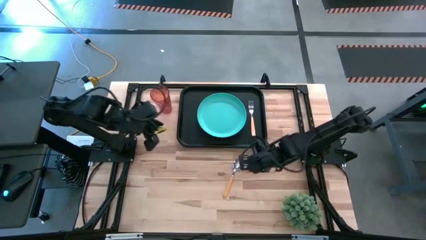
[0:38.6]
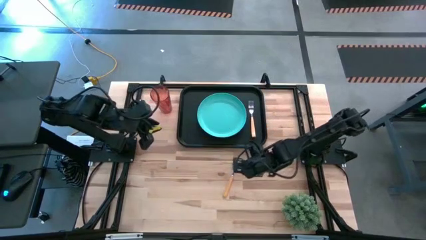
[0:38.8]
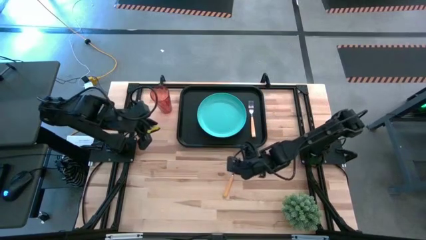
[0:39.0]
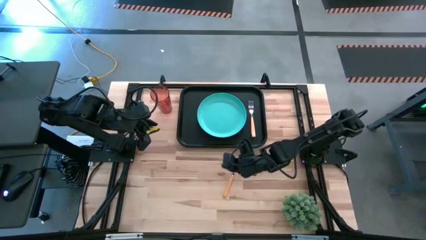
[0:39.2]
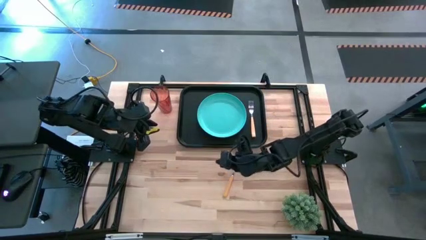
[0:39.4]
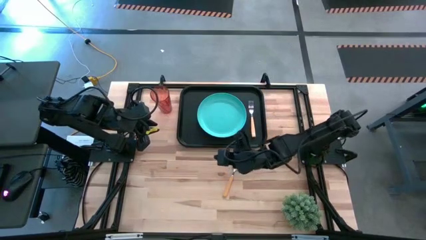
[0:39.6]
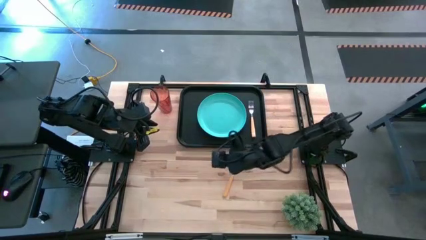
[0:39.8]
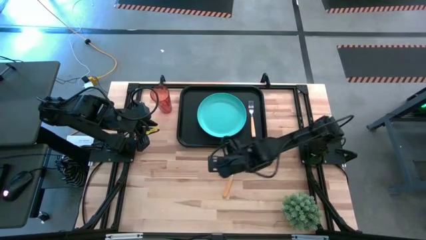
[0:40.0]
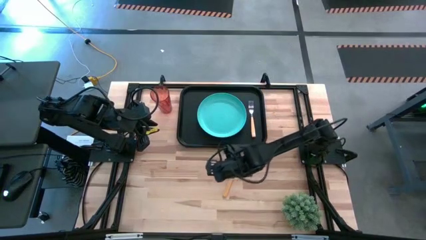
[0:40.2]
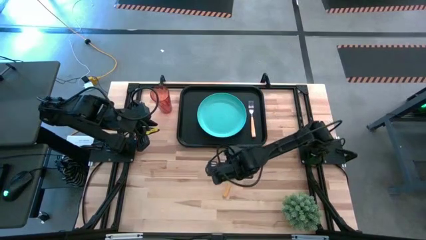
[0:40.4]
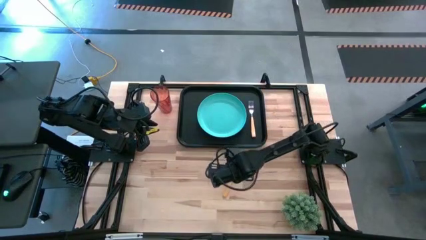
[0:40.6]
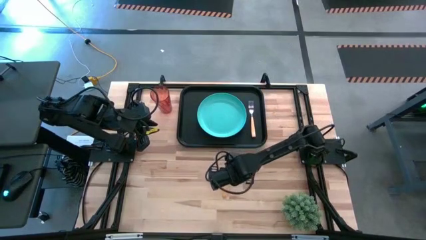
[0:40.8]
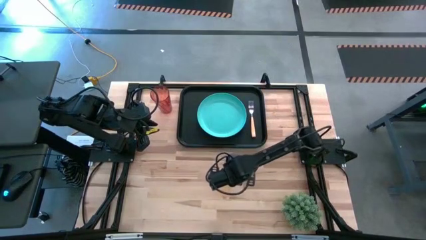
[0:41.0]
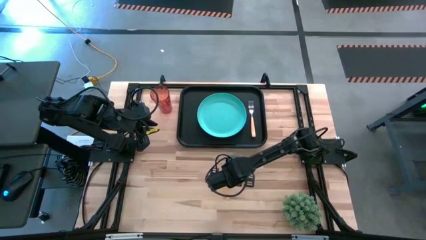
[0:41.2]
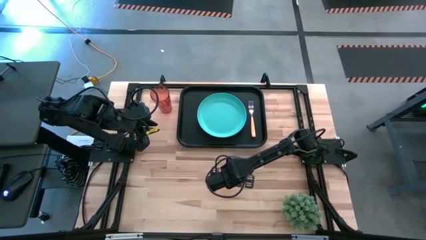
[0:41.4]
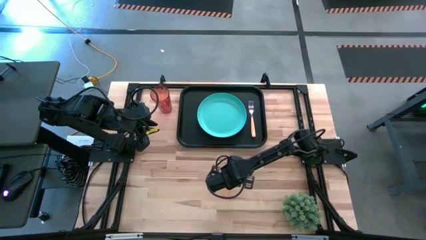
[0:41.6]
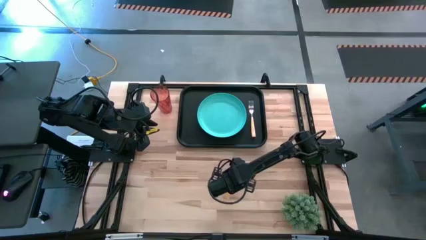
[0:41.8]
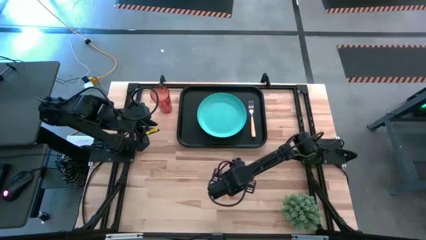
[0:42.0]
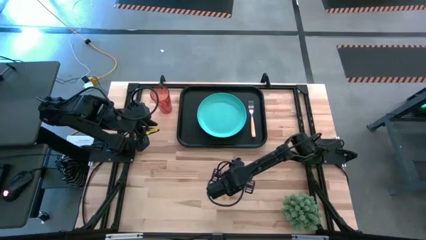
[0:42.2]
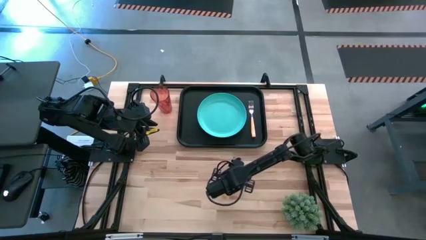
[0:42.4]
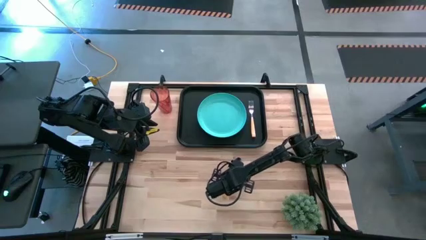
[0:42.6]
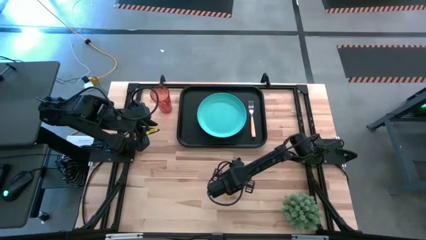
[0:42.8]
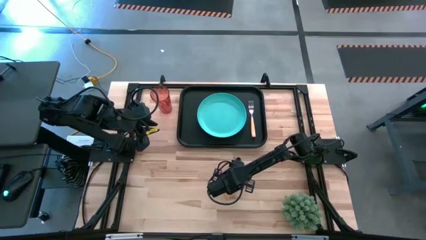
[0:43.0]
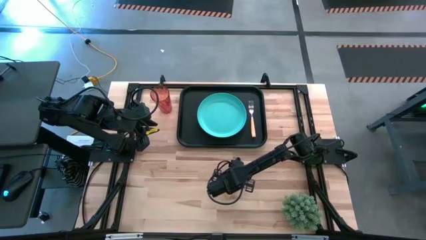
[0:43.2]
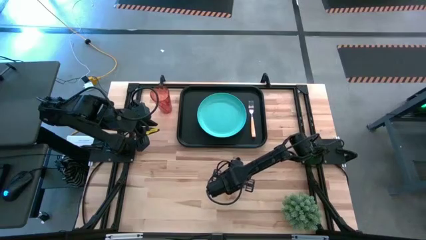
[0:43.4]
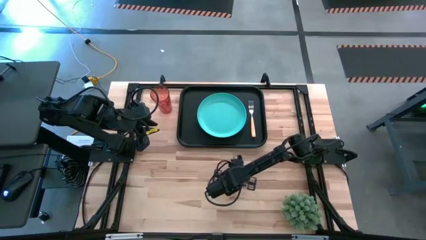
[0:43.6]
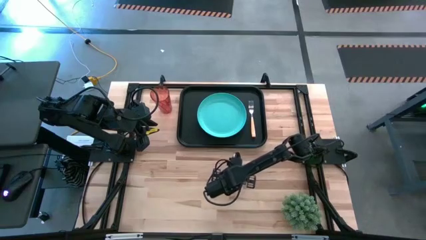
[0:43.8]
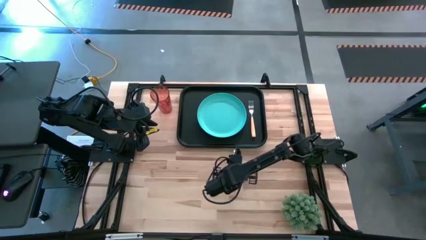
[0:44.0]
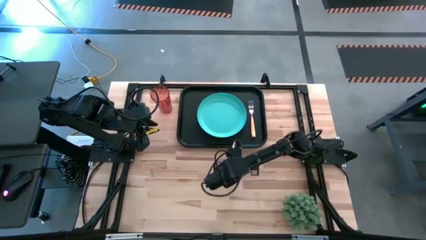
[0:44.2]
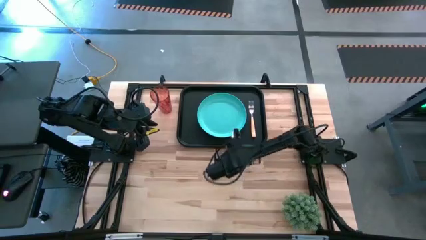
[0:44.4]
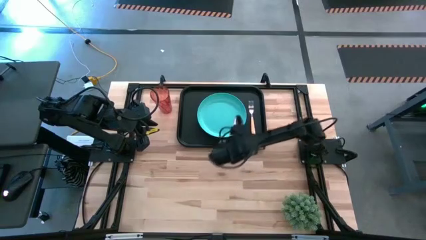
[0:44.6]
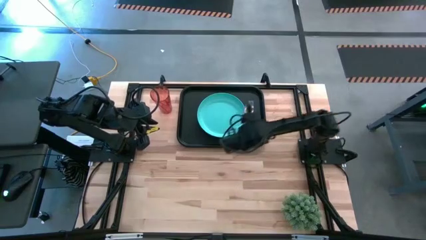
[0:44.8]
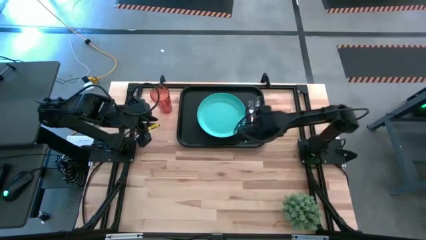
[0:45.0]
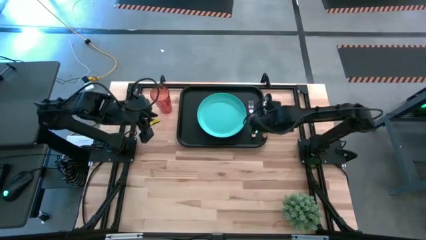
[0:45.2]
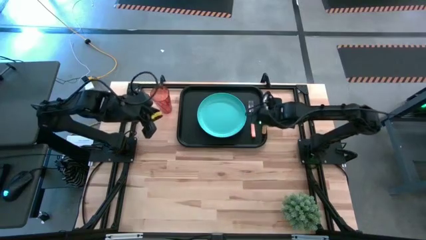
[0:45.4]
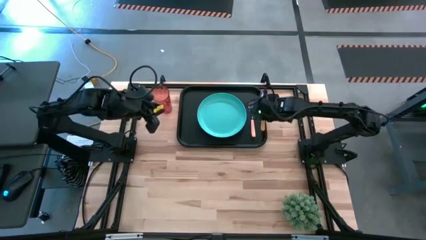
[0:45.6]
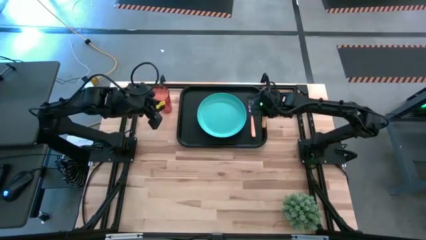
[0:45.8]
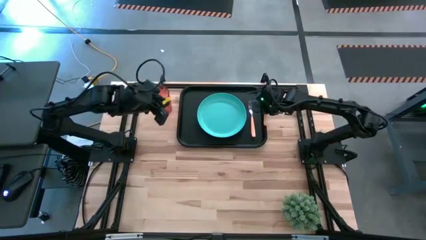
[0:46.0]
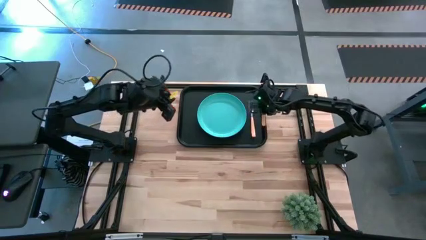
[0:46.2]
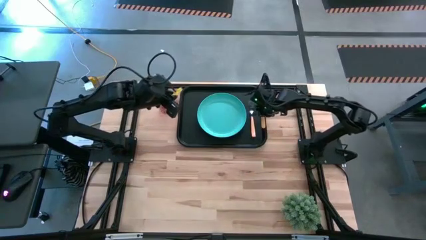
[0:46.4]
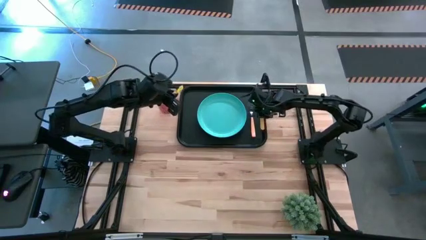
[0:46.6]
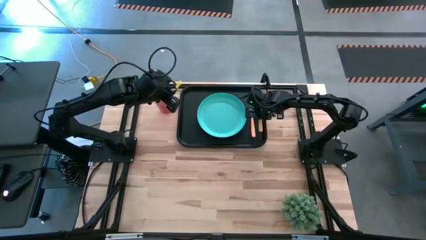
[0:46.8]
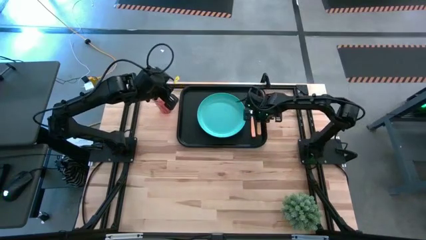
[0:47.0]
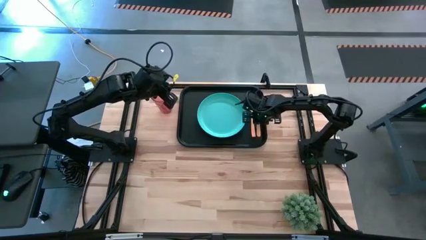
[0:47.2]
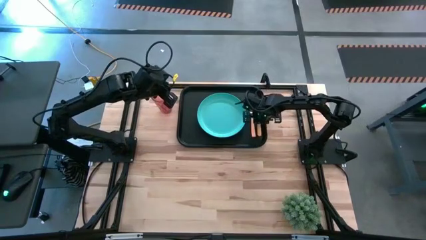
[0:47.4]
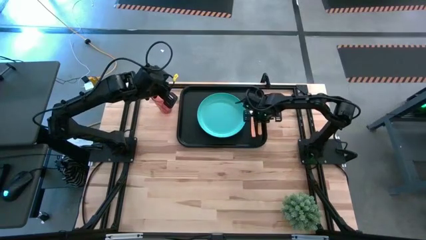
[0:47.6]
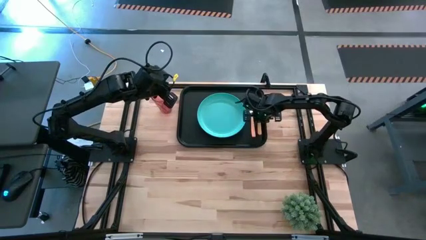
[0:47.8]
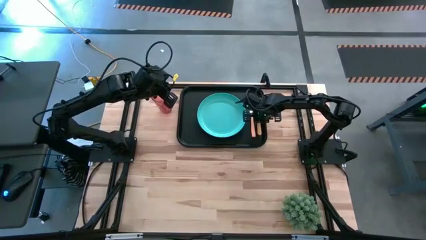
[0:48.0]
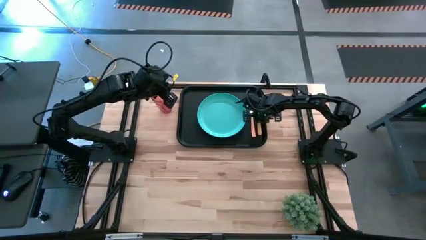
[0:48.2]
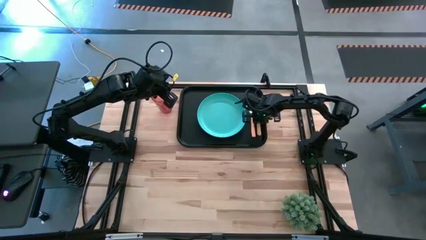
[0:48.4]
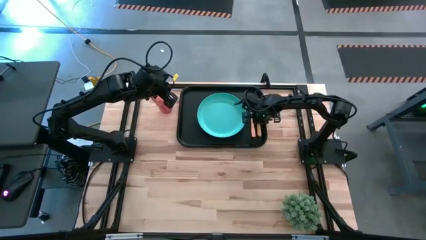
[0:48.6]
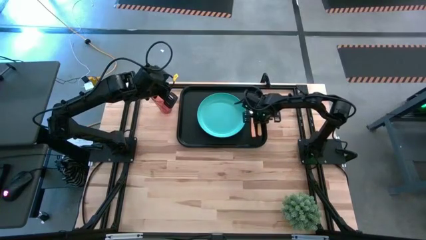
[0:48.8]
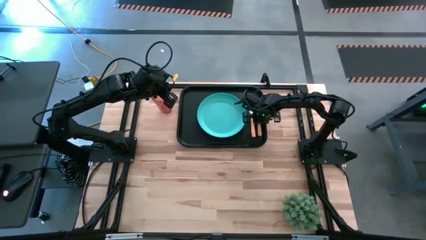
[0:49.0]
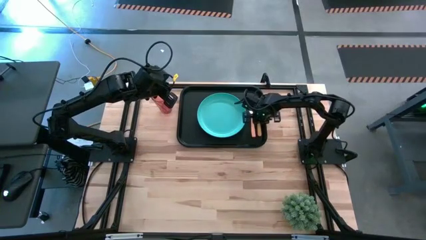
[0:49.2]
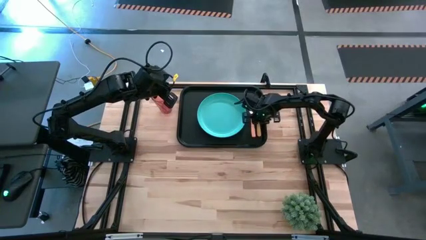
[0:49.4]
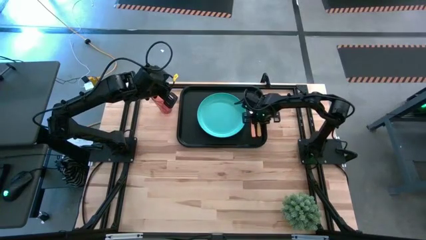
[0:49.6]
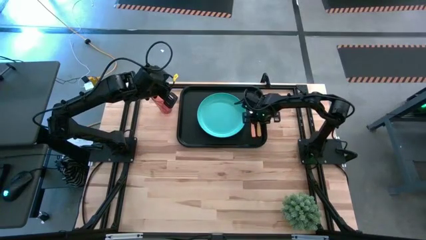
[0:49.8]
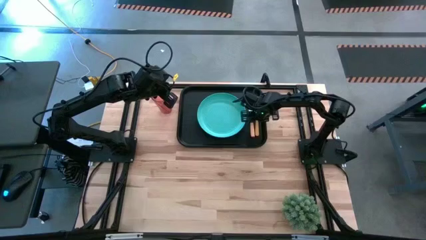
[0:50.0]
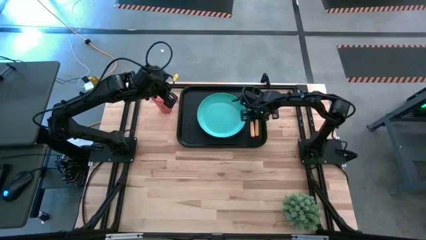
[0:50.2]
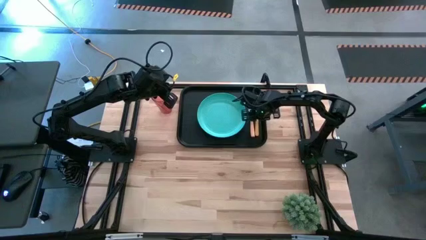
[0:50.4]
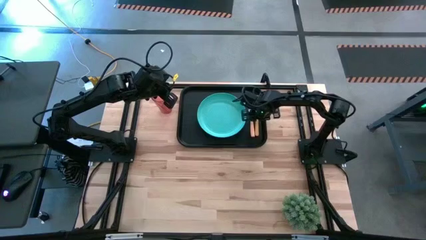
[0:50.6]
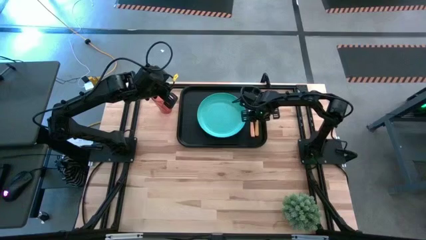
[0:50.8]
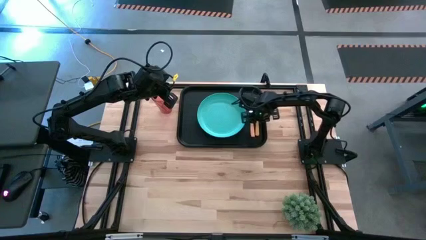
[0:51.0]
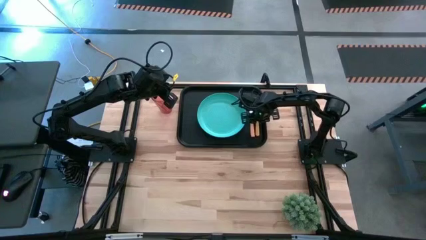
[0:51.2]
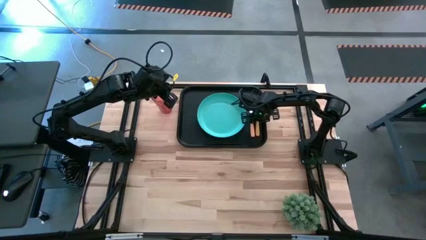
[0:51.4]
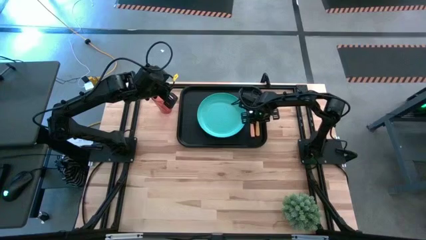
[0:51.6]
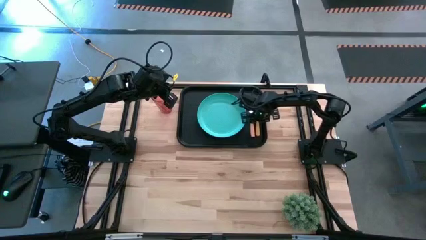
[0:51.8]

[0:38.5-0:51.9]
Task: Pick and place plate/cup/fork/spoon on tray
Put the yellow spoon on the black serving tray to the right of the orange fork

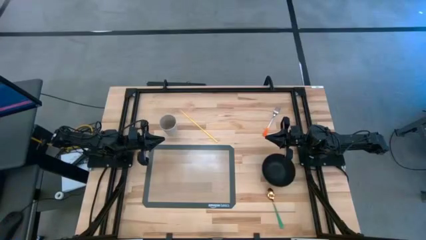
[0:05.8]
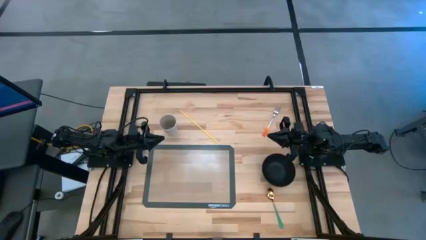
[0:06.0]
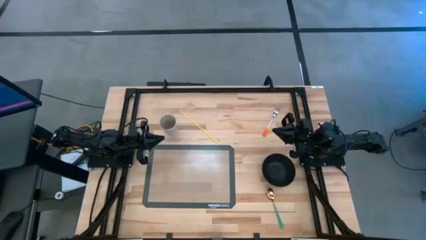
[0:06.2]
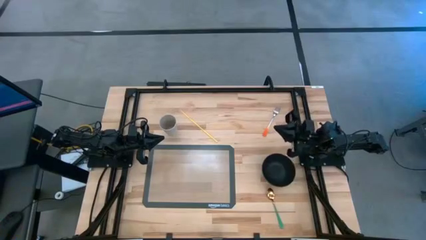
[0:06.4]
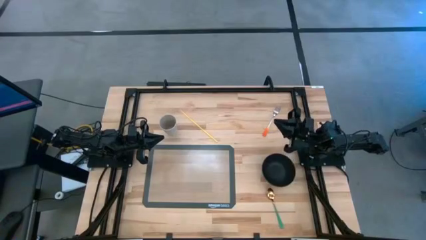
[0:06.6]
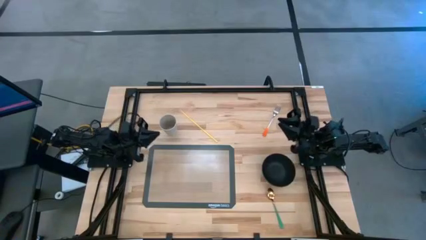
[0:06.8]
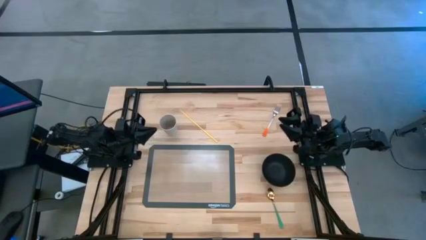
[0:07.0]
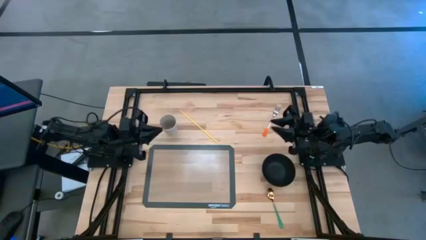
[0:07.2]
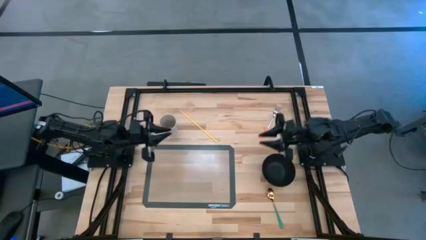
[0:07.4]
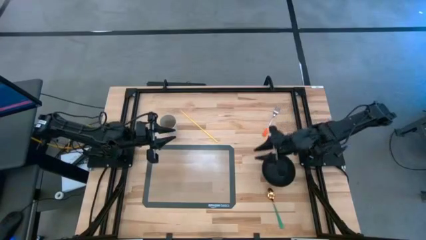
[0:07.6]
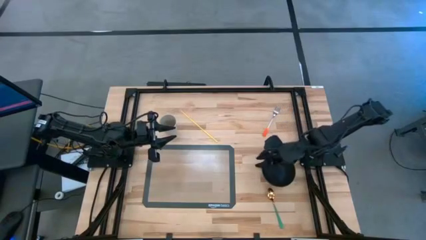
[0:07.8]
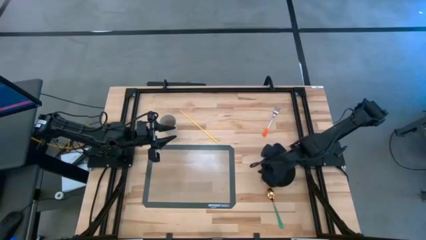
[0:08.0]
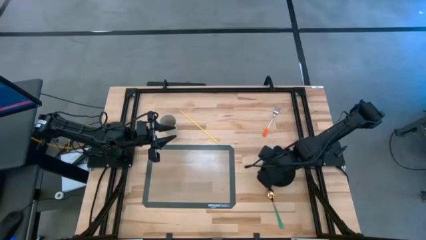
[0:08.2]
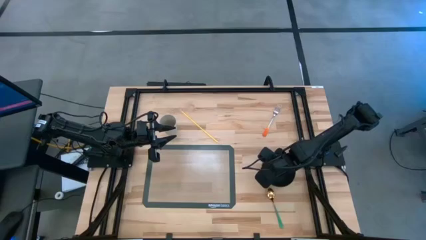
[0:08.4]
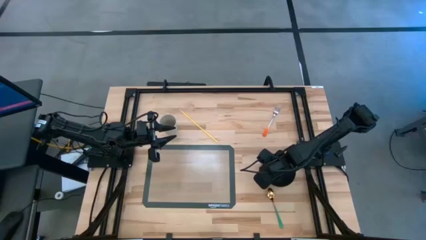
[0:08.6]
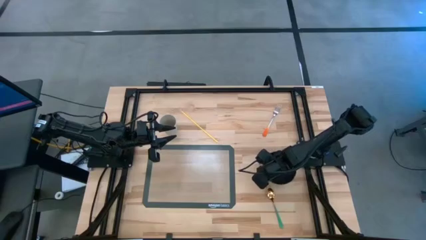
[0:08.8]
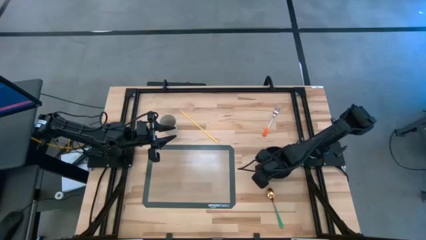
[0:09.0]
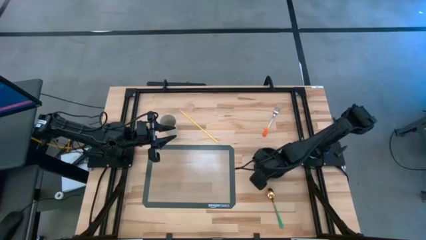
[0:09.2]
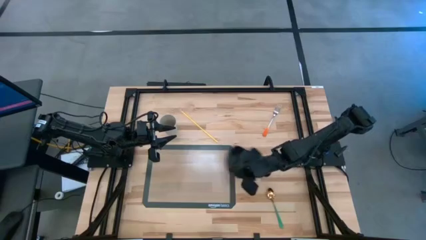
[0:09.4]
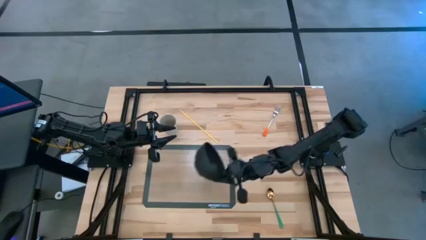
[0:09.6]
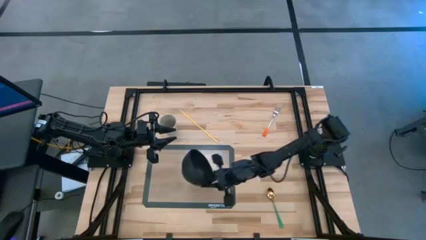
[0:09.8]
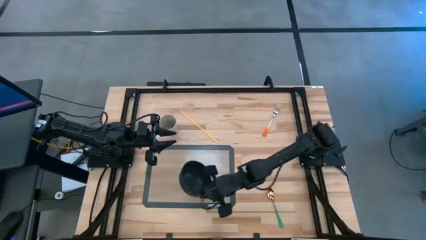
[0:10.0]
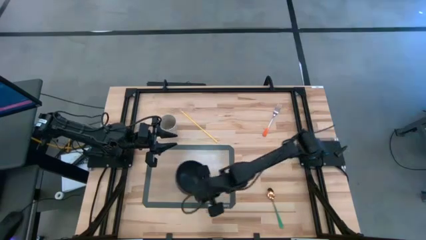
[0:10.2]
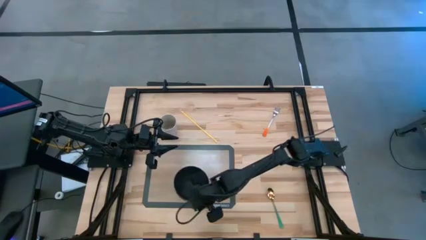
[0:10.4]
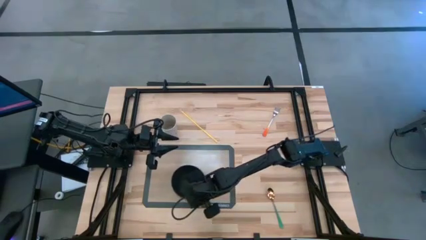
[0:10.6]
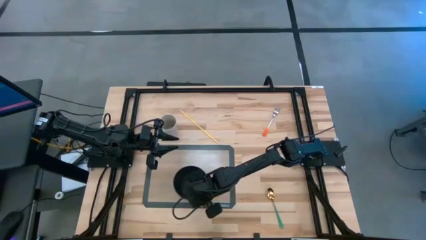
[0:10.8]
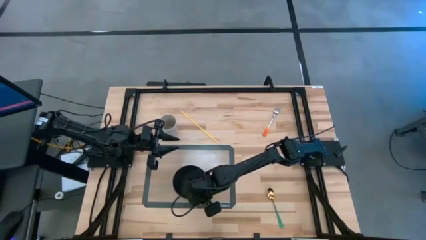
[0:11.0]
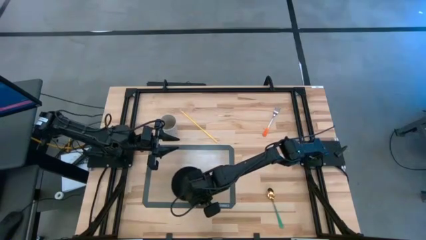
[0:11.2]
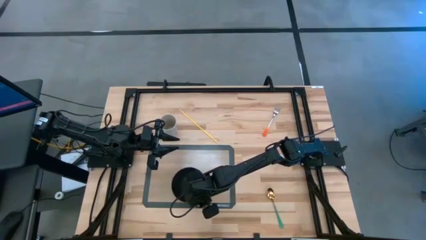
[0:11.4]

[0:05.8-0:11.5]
Task: Pick & Place Utensil
Put the black bowl on the transparent mat
